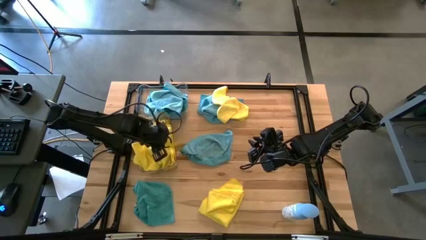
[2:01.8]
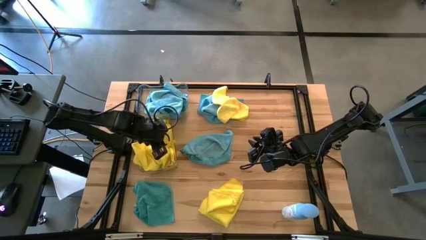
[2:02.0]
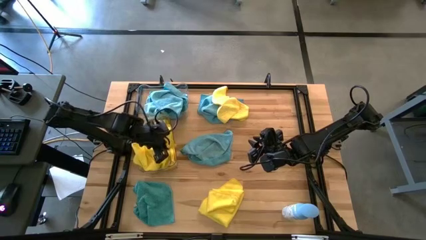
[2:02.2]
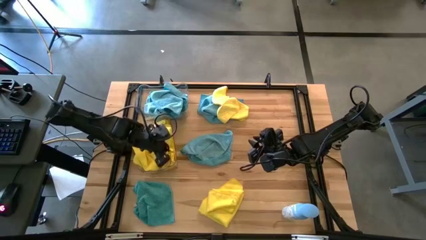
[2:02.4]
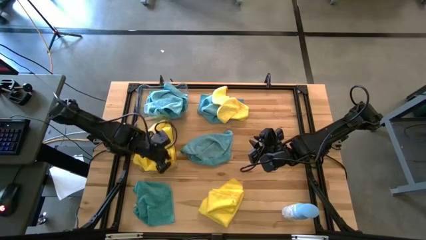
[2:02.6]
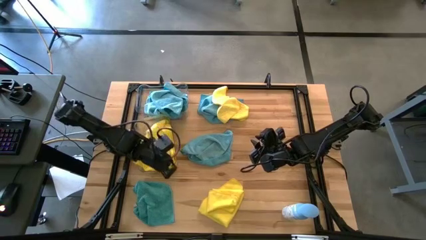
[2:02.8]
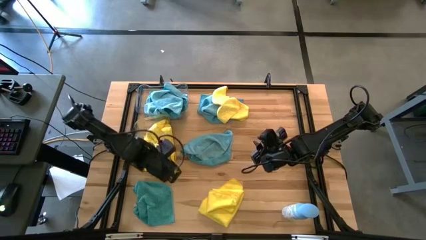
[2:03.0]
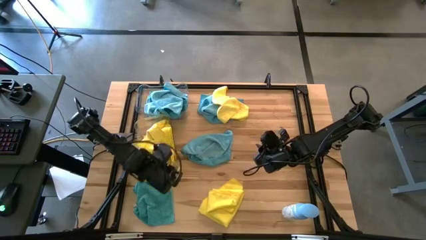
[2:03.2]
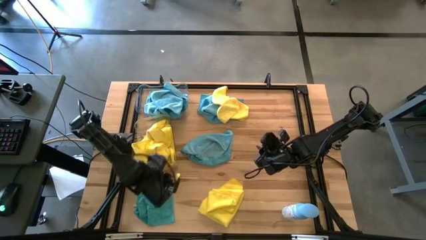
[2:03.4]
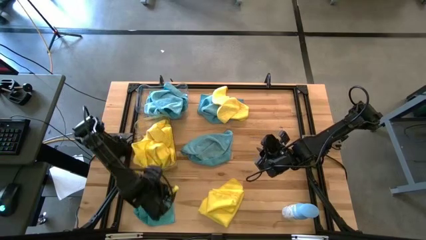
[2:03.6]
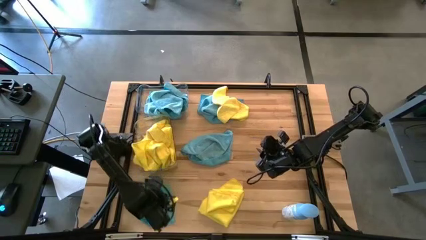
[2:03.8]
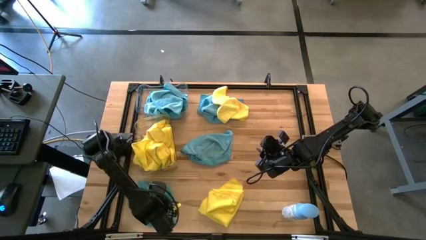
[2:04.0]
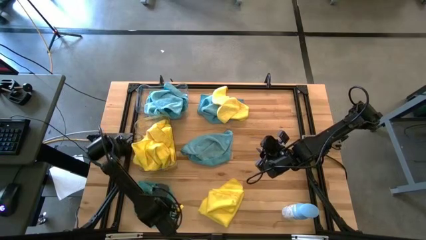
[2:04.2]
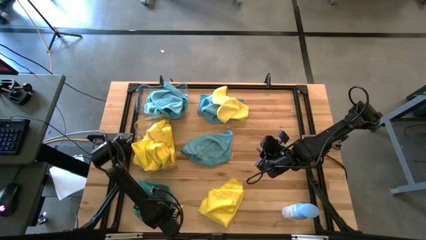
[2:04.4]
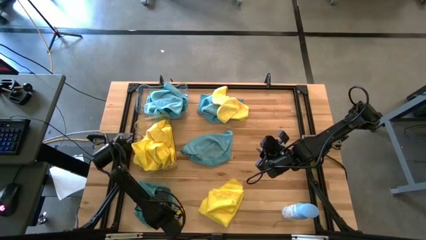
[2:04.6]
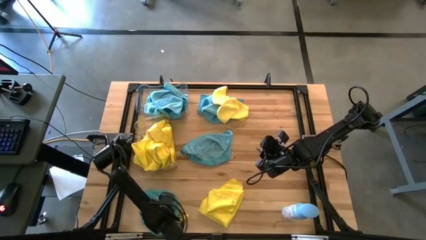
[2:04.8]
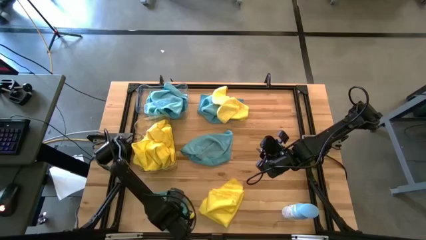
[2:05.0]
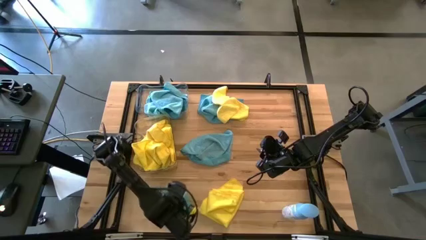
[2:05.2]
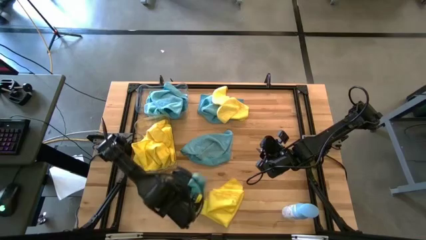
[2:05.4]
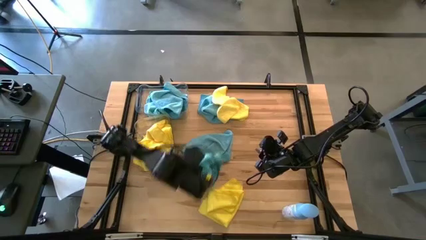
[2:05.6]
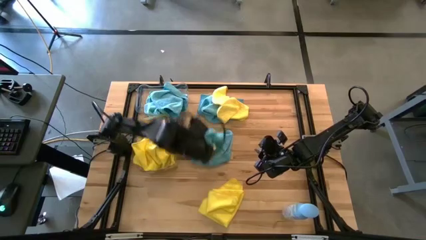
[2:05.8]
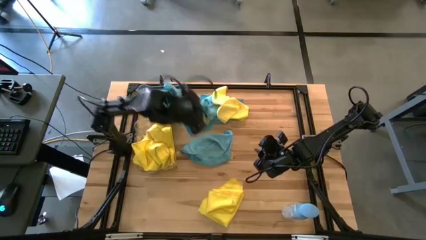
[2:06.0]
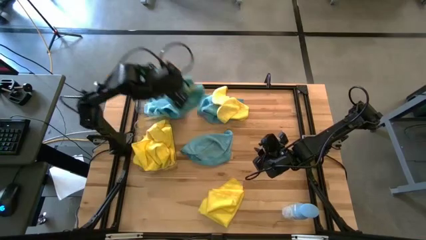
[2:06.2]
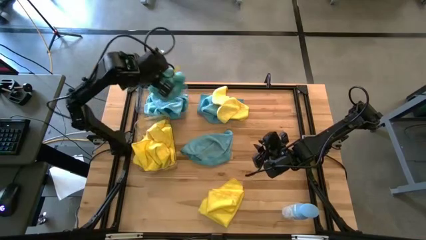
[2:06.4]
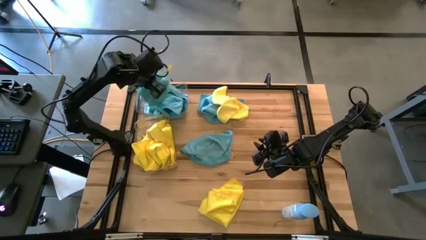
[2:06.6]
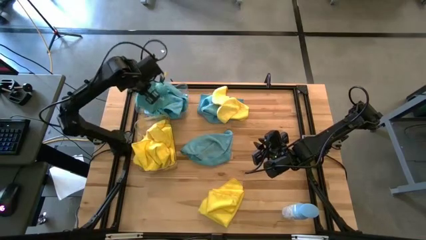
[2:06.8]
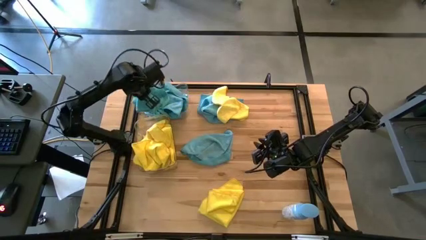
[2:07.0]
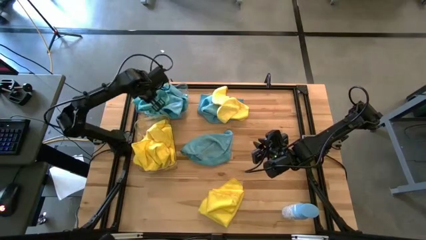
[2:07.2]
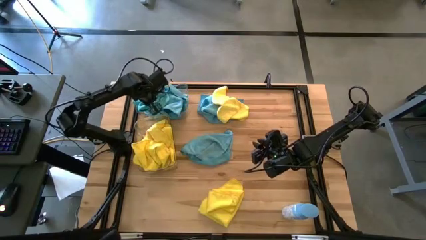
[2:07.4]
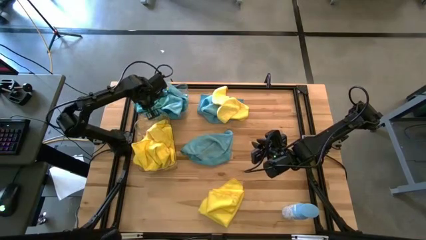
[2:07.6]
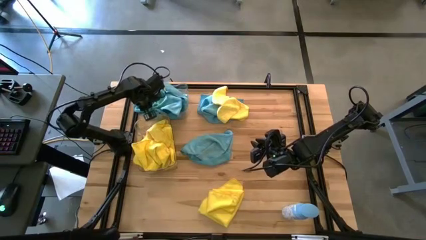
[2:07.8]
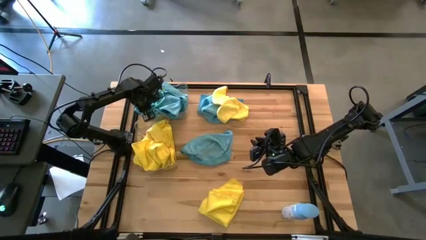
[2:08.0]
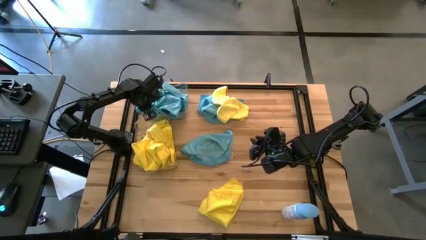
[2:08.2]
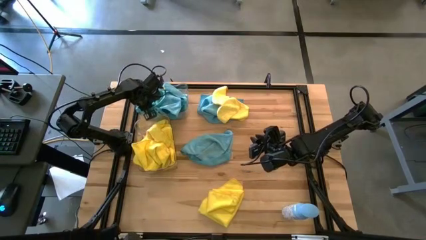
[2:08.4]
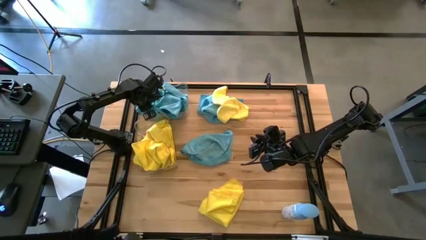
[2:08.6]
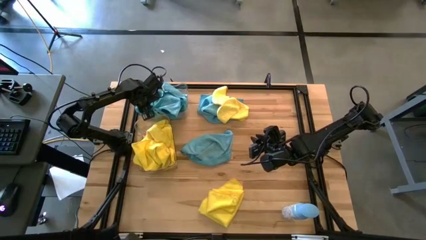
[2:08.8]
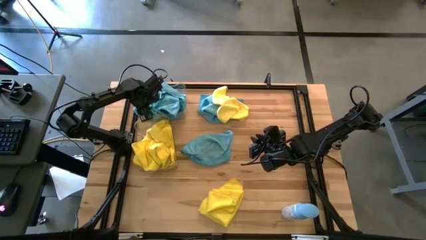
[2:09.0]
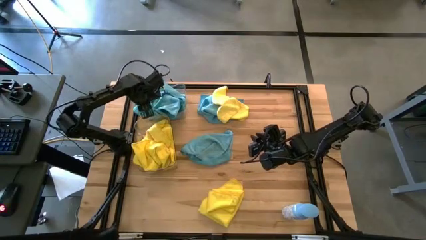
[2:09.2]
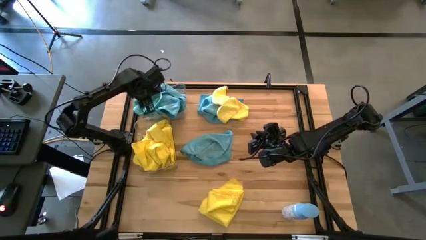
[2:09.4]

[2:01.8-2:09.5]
Task: Sort microfiber towel by color & place in baskets
Put the blue microfiber cloth into the top transparent bin
